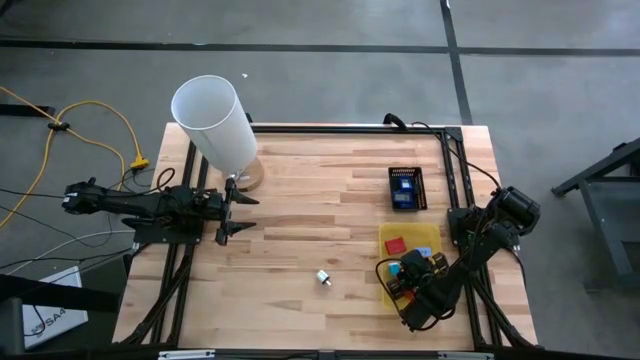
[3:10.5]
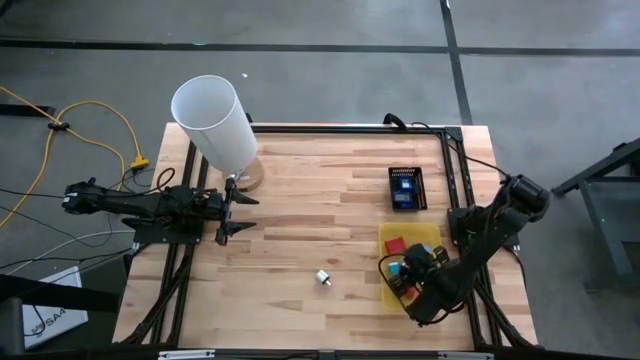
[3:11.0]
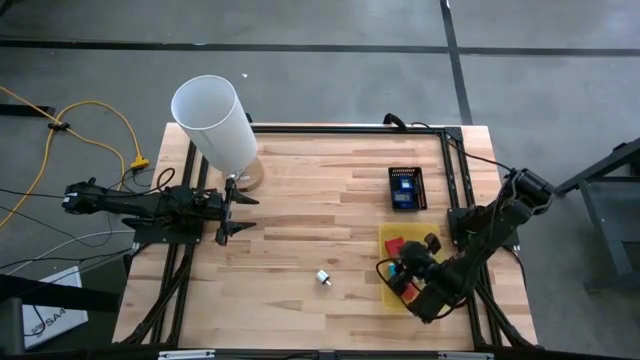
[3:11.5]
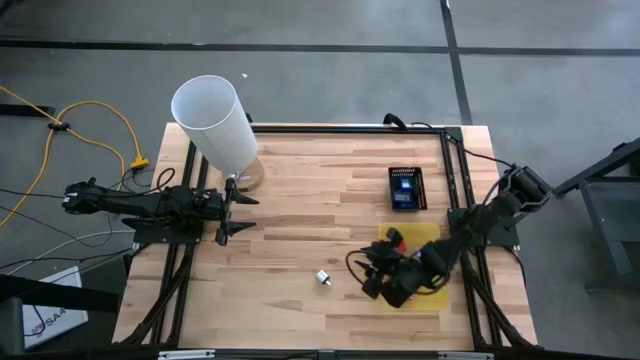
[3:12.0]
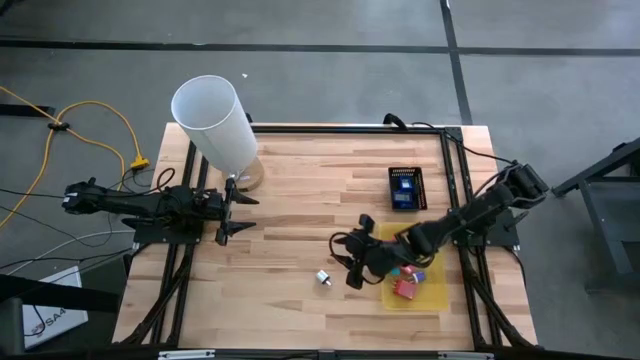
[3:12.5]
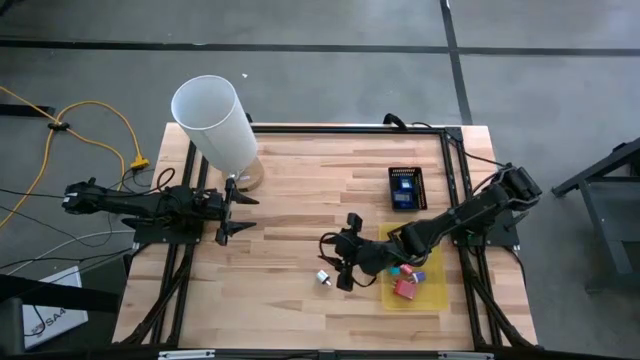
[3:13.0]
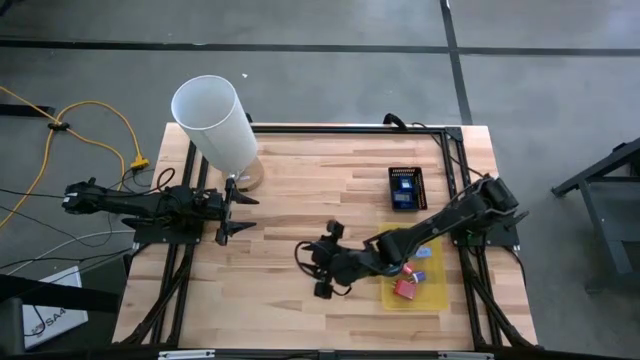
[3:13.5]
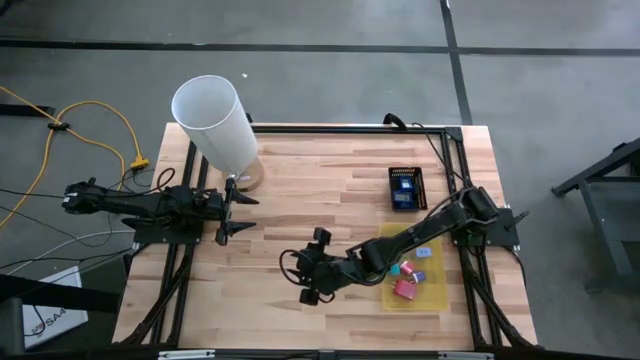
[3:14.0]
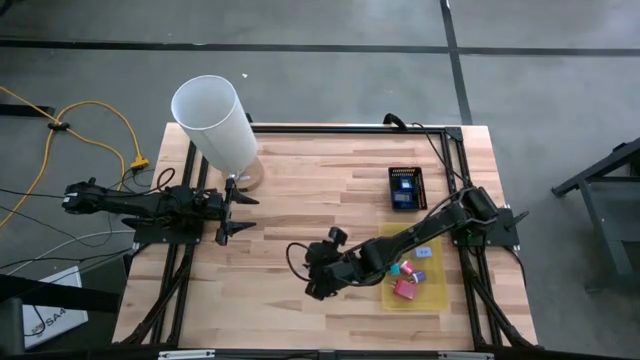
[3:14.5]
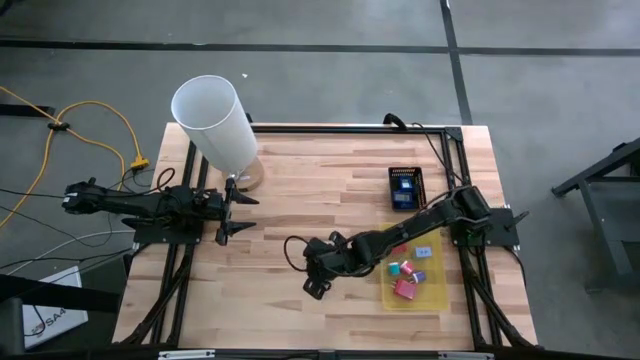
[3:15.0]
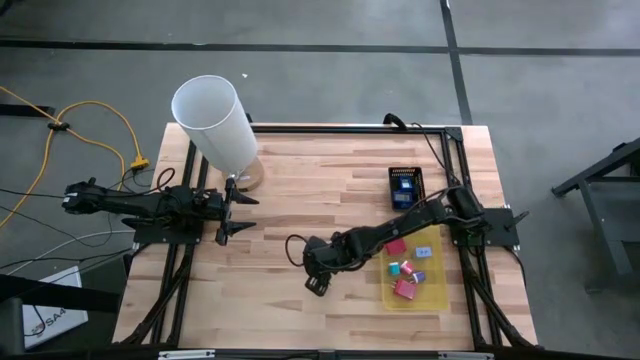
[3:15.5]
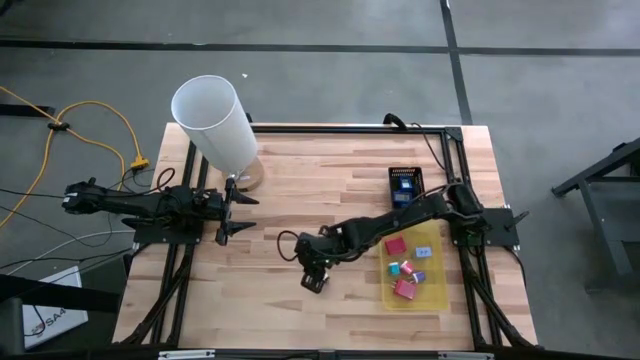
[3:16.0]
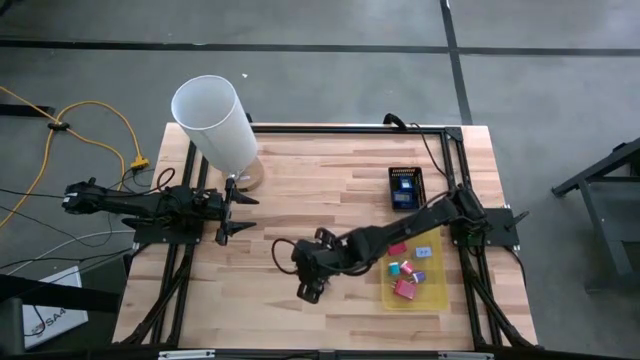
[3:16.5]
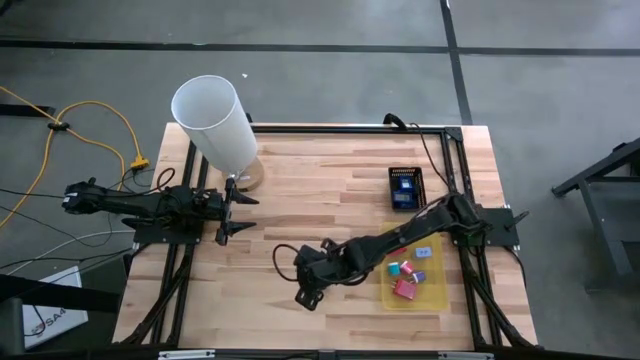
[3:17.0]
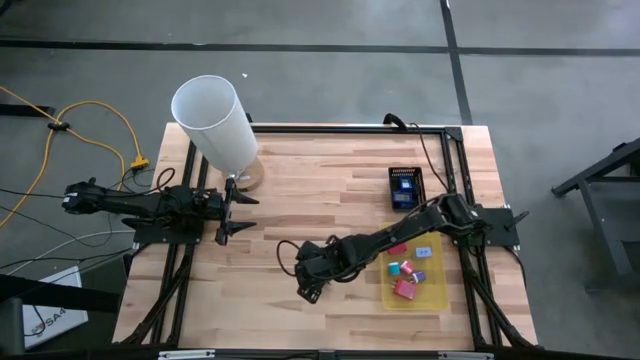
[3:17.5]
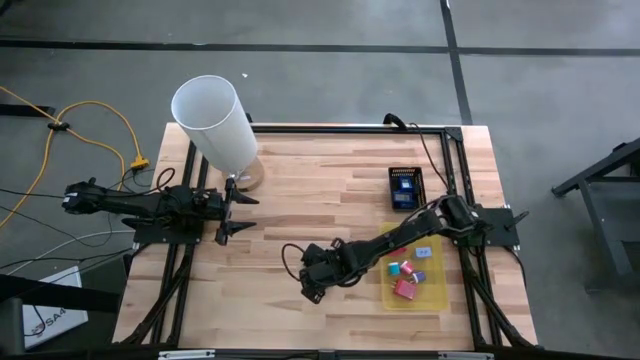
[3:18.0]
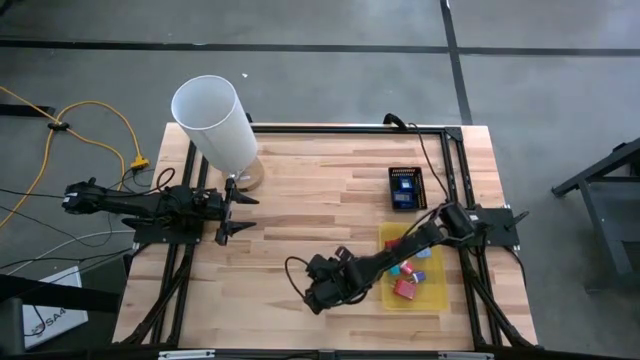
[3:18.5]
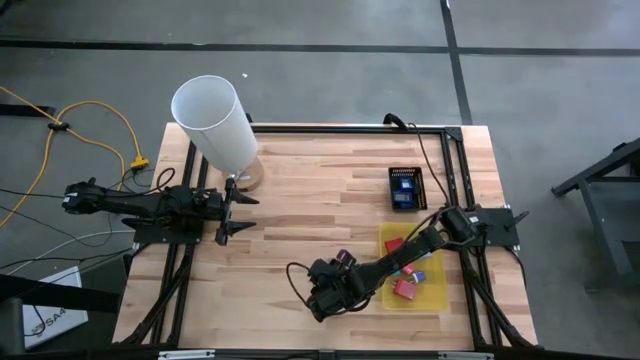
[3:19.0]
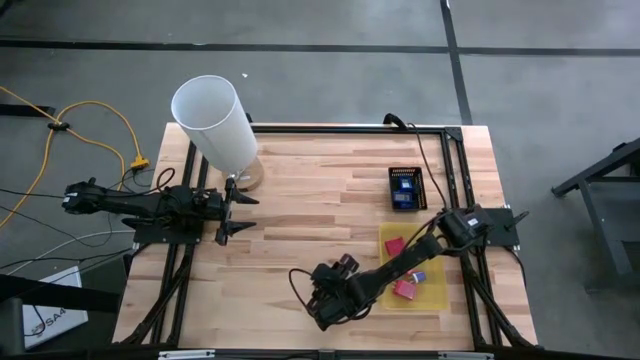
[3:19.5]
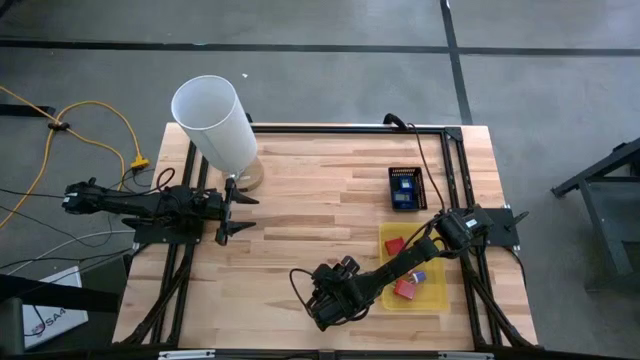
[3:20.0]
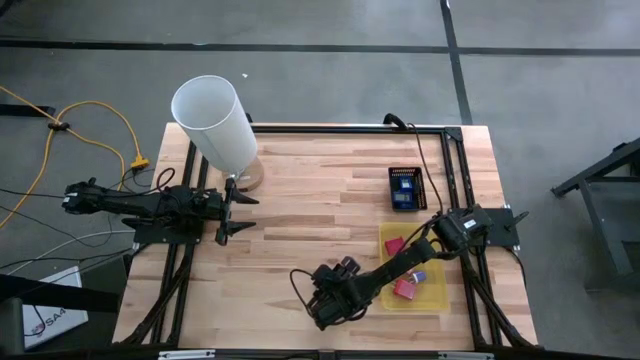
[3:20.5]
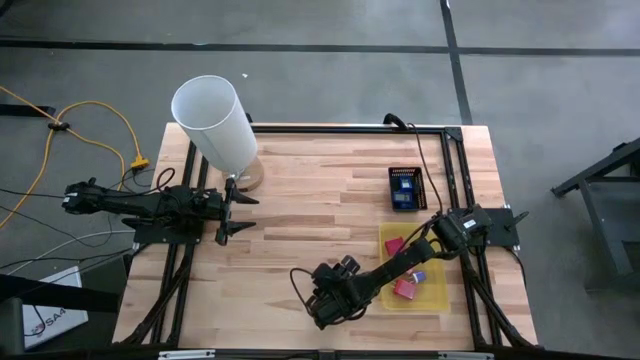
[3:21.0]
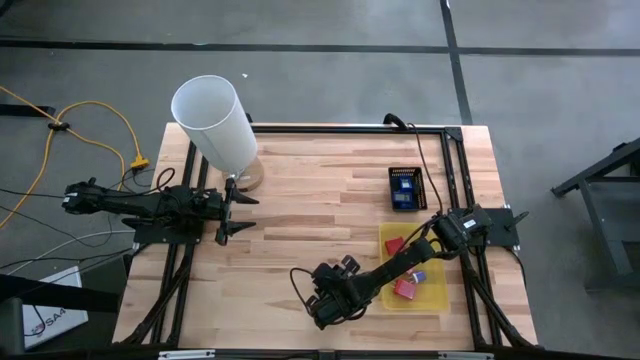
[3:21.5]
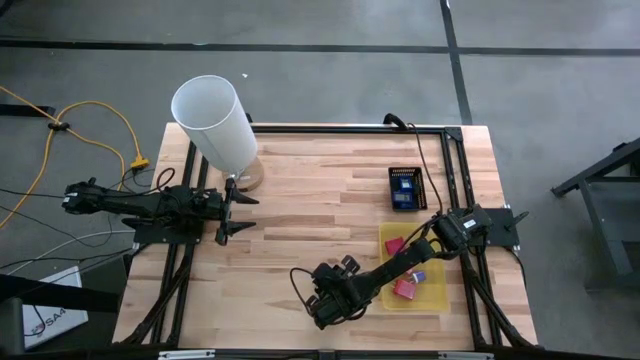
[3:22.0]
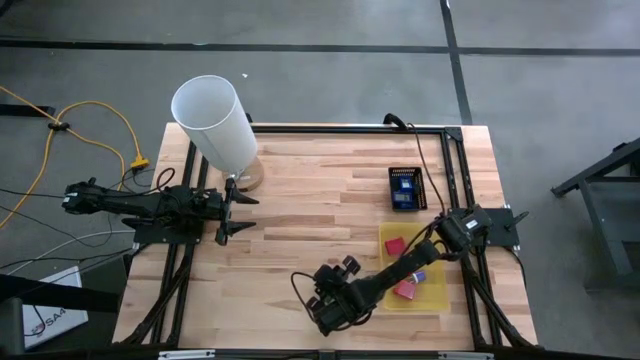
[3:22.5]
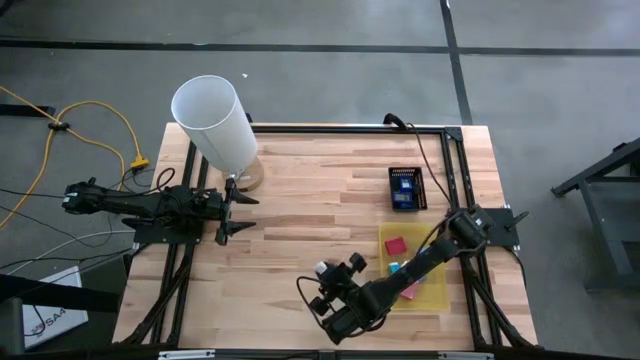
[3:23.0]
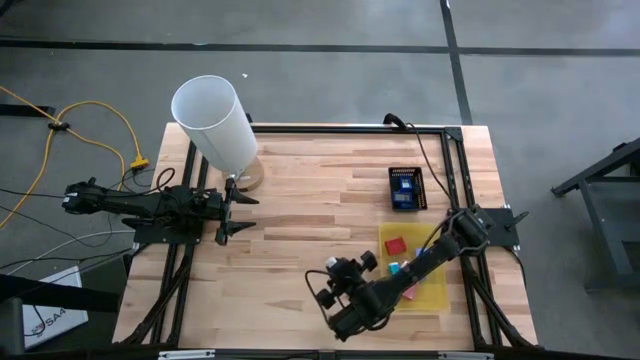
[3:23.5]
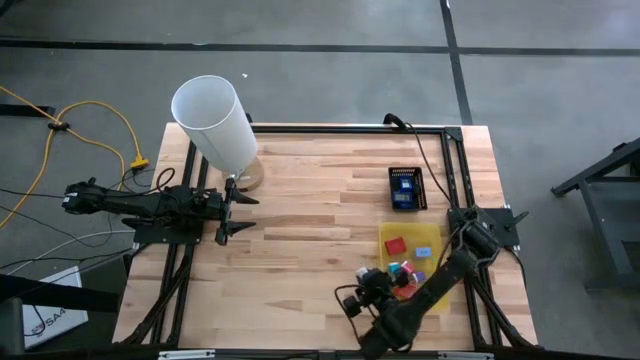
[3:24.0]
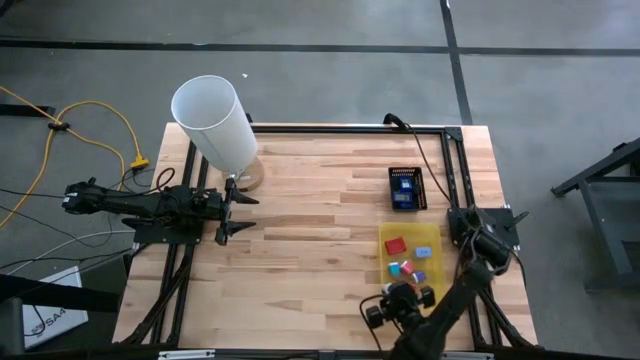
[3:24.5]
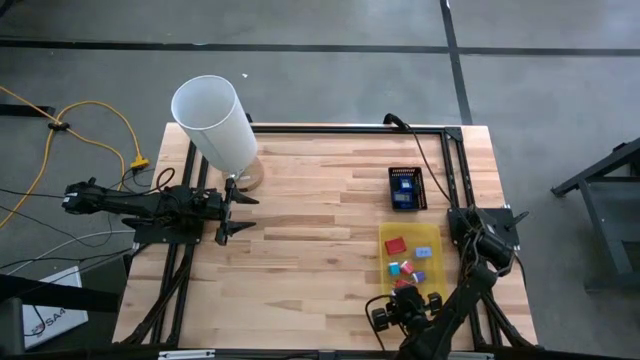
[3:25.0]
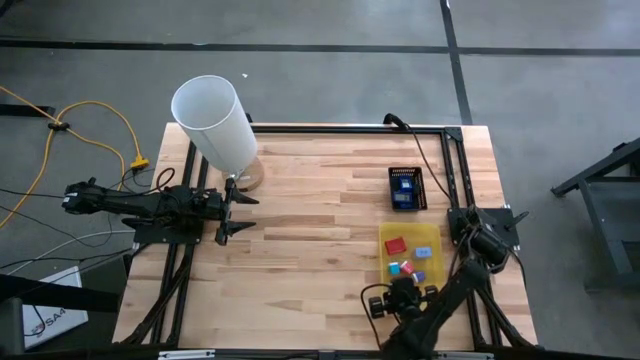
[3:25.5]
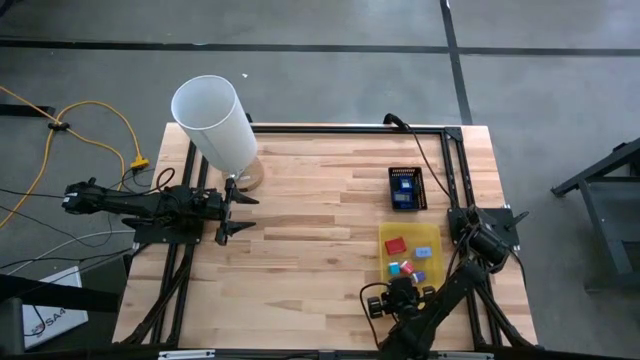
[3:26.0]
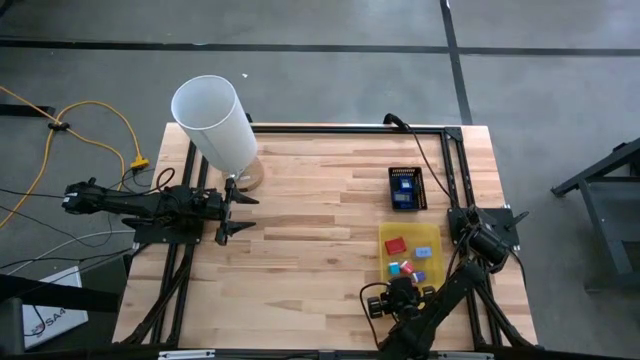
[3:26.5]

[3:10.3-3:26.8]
Task: Pick & Place Office items
Put the white charger adapter into the yellow bin

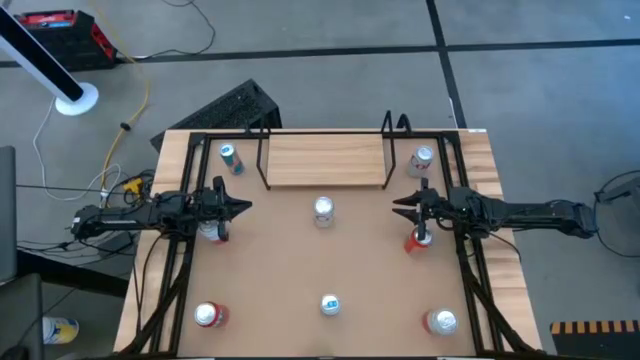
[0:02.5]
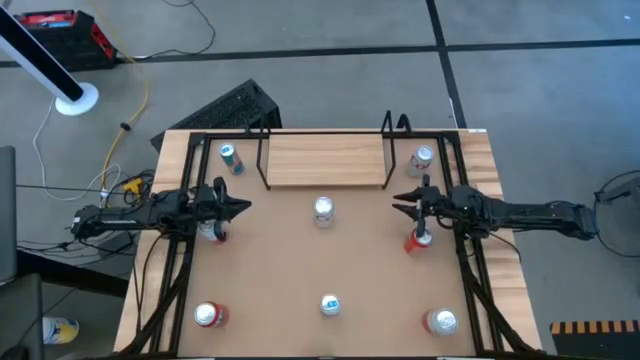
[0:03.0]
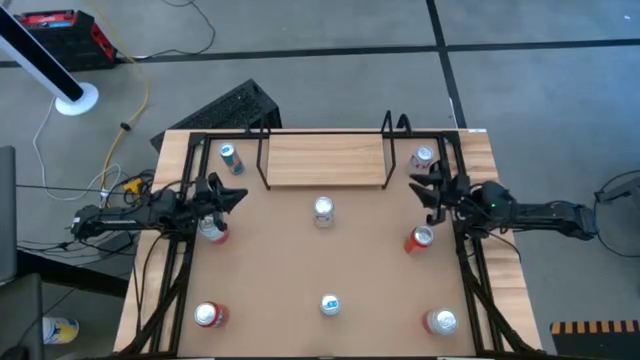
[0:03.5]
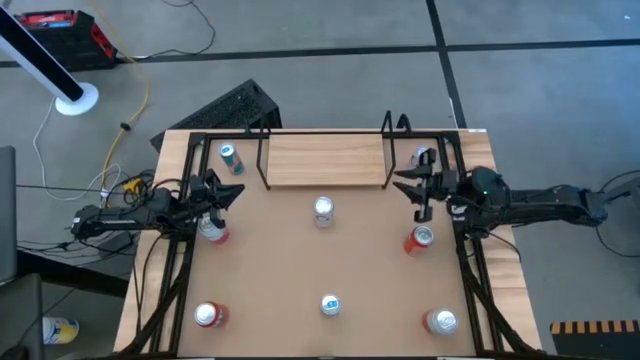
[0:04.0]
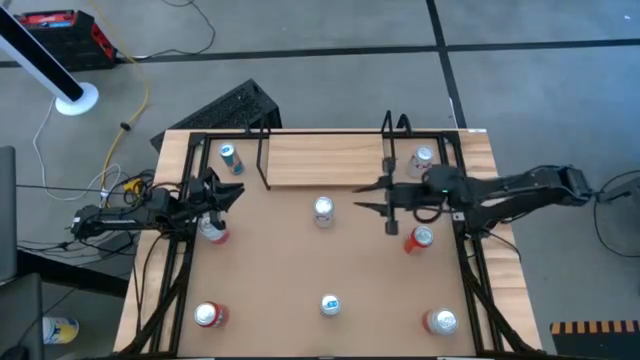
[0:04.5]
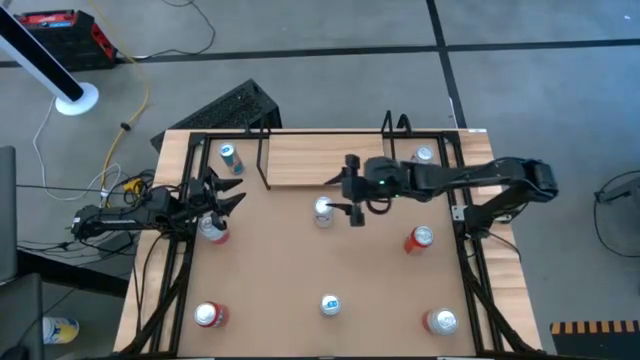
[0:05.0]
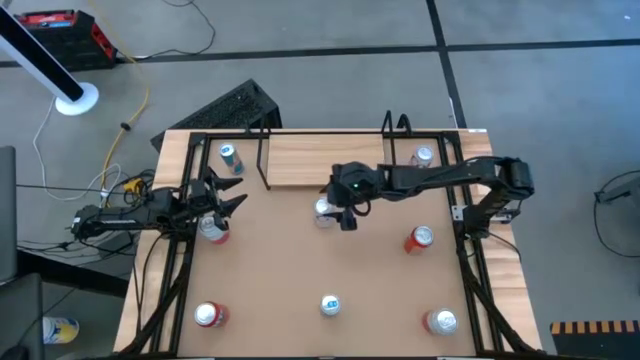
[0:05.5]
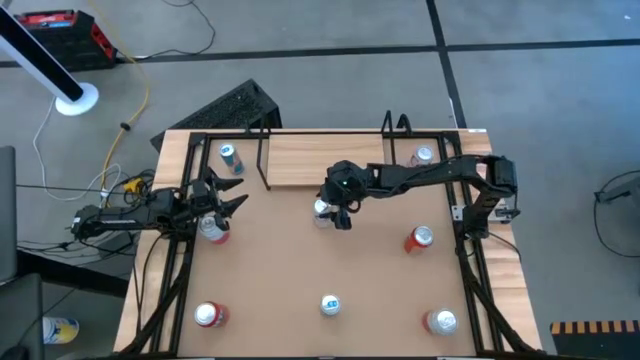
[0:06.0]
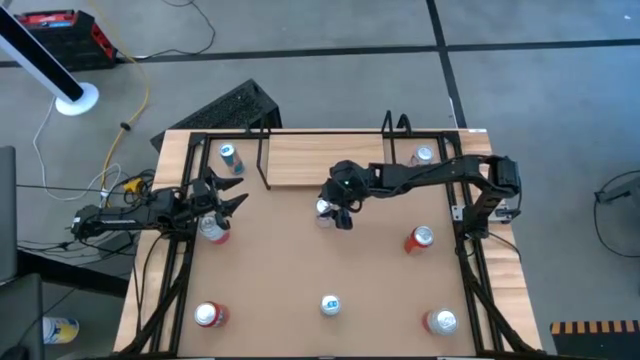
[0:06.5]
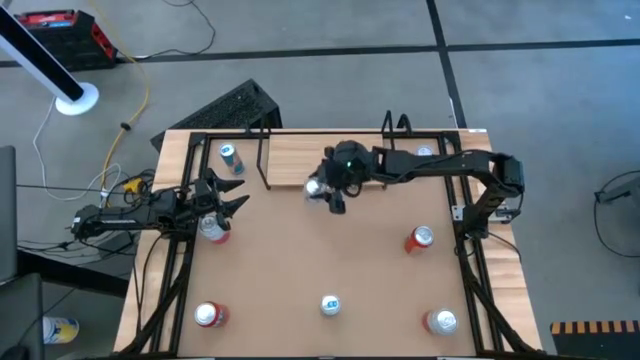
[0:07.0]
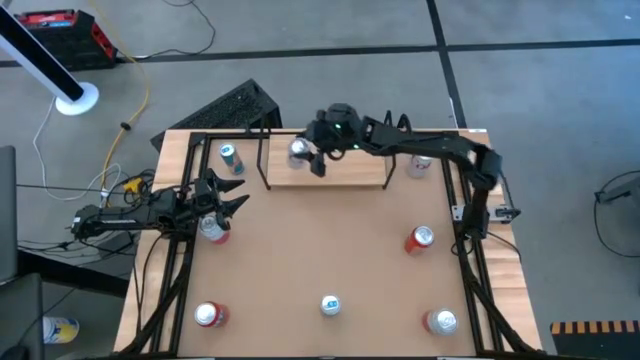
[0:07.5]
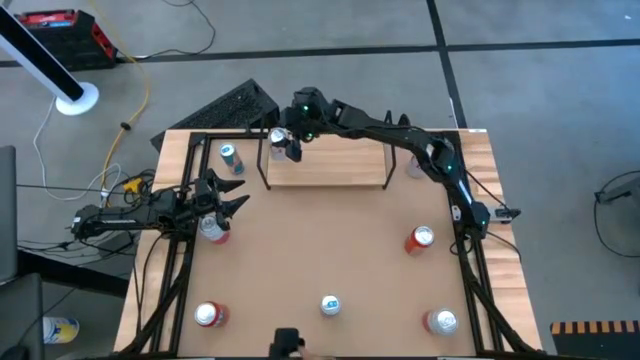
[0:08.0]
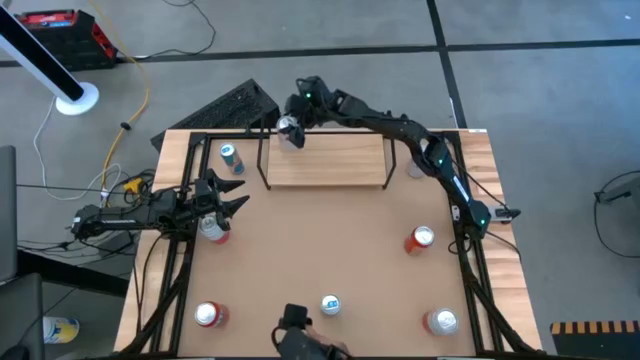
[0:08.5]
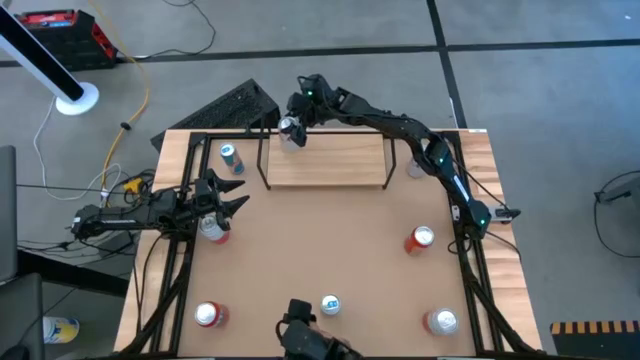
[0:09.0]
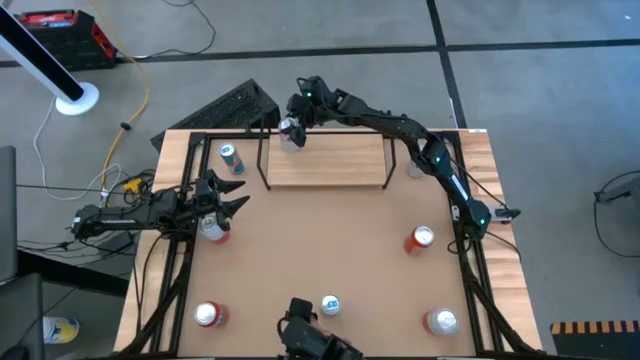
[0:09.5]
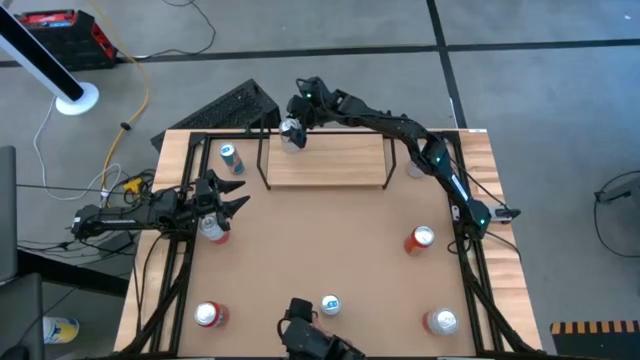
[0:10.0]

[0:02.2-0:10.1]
Task: Place canned beverage on shelf
Put the bottom white soda can on the shelf
